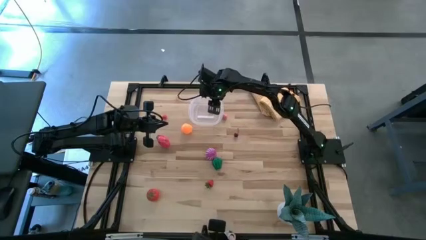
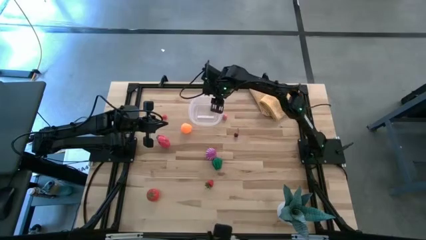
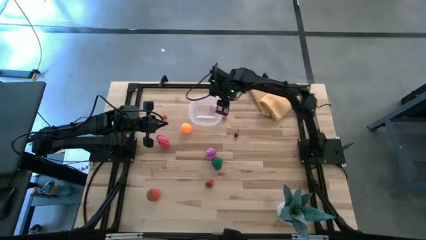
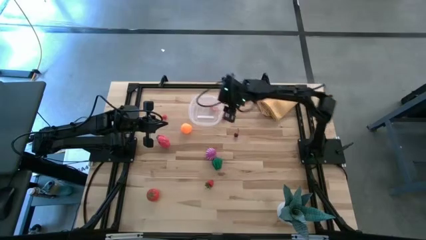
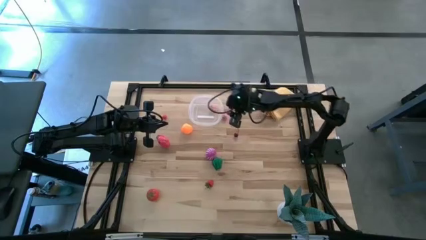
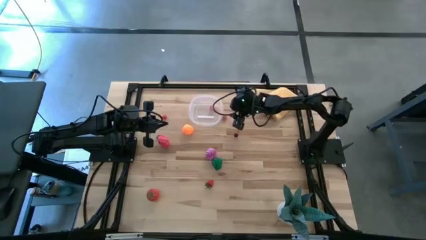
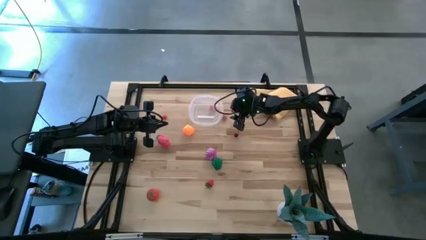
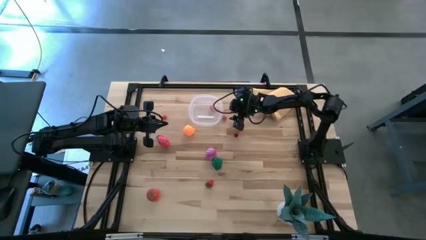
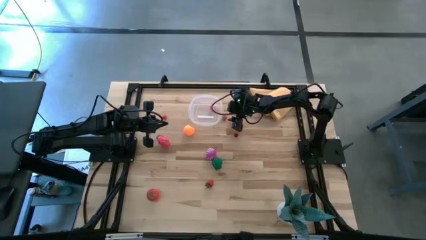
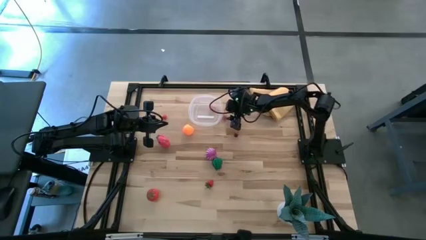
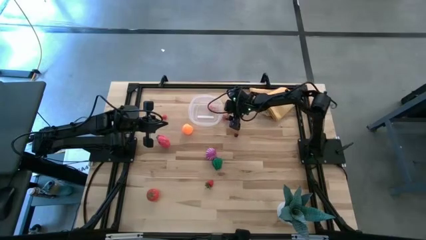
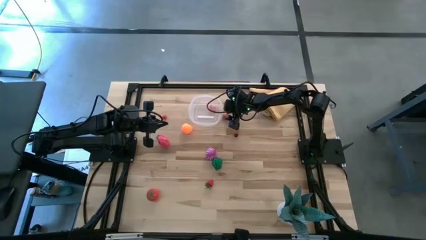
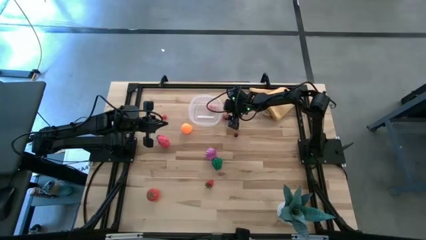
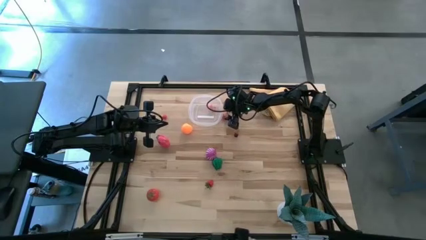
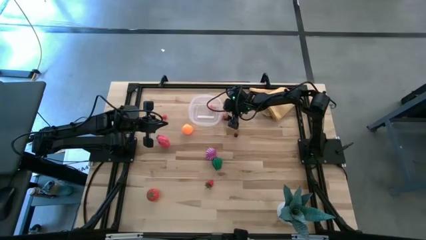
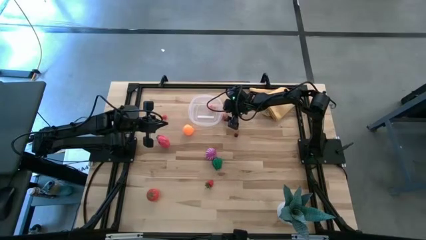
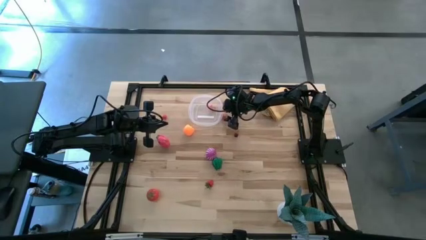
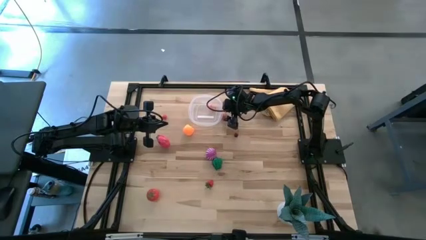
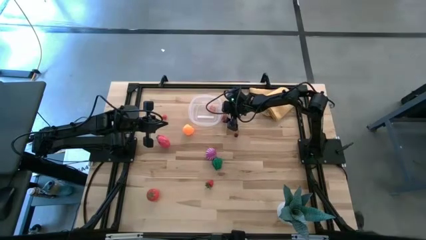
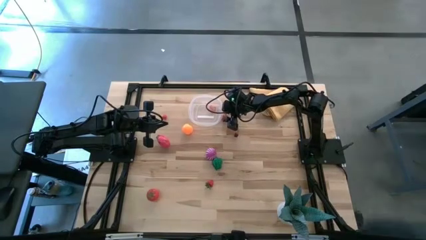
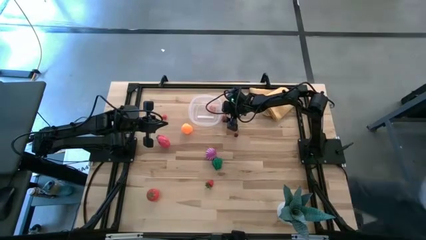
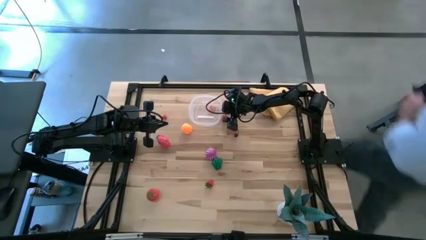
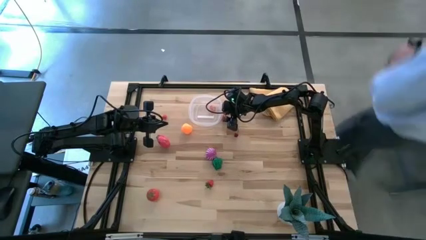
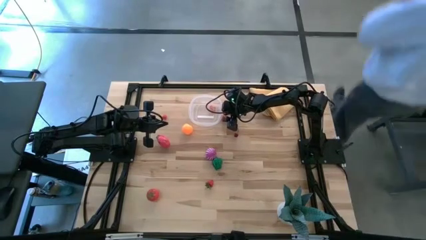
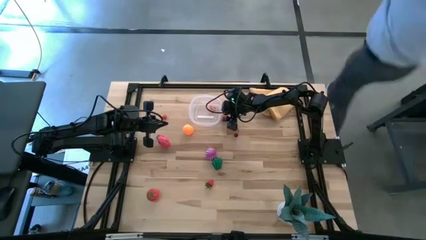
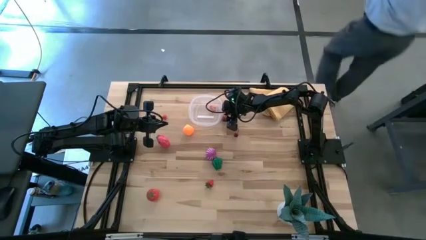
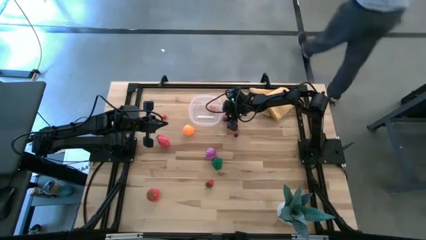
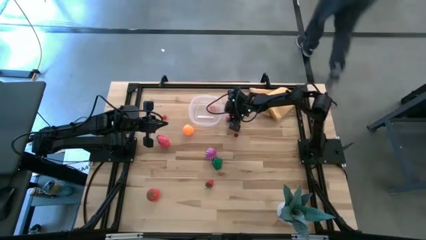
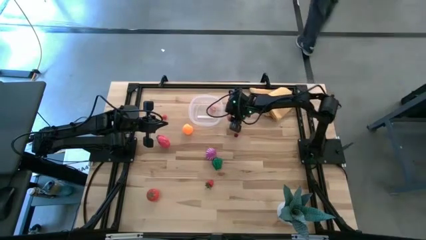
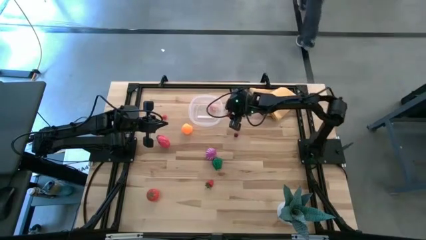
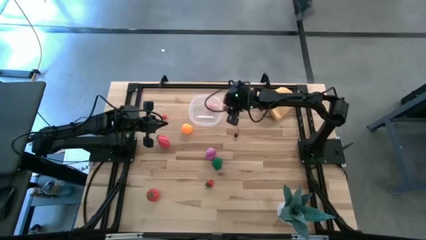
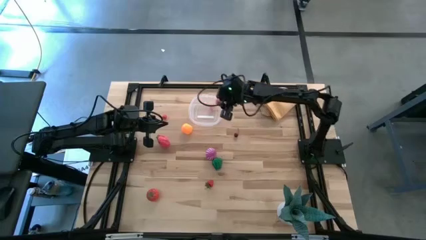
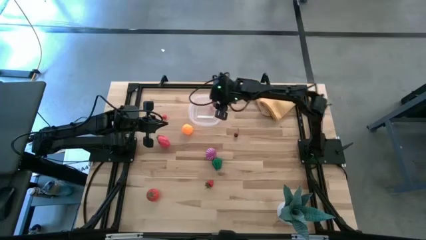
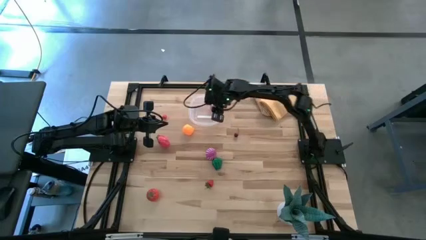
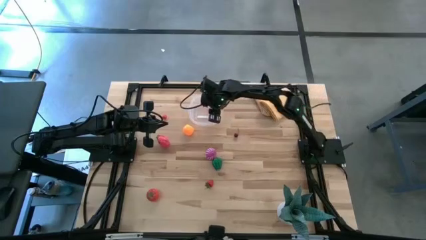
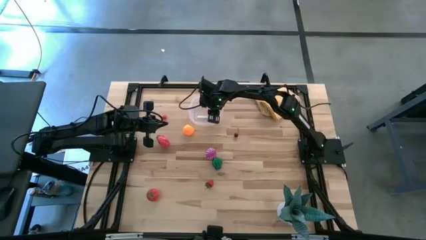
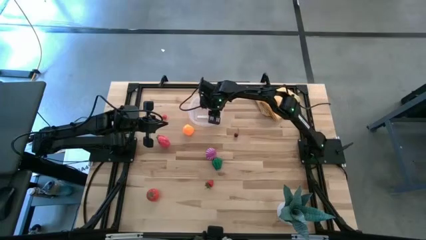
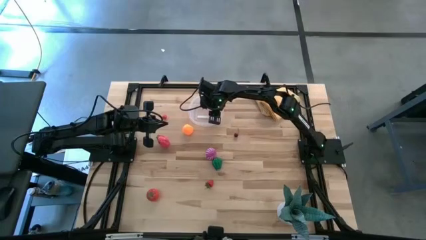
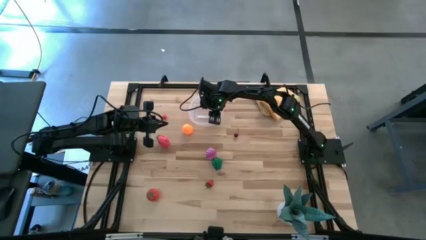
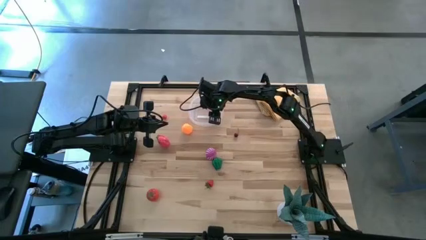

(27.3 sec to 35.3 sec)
Task: Pick and placing Produce into tupperware
Put the pink peach into the transparent bin

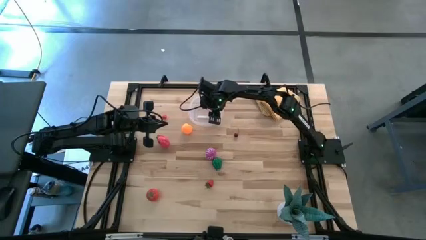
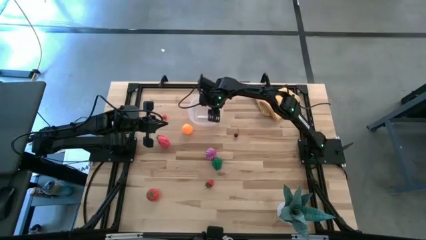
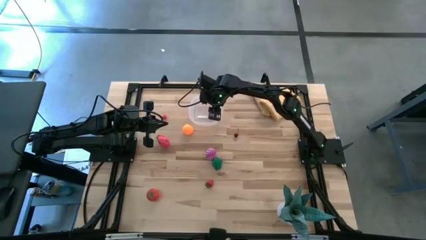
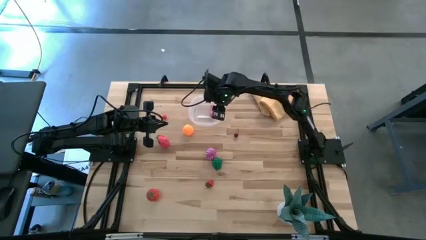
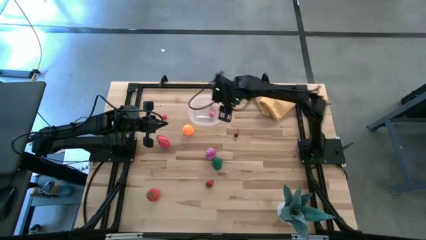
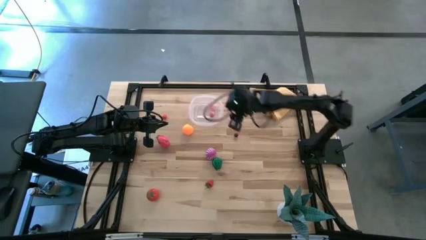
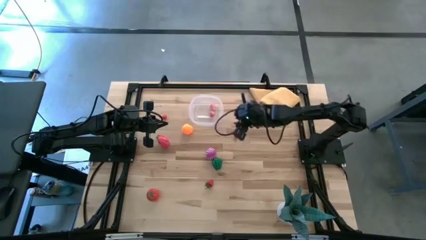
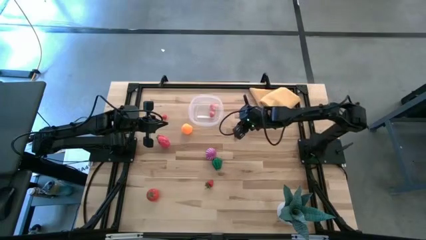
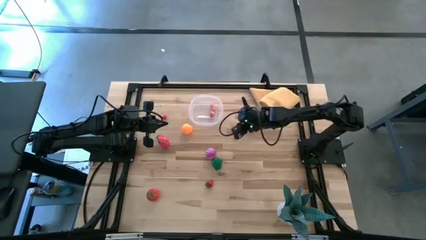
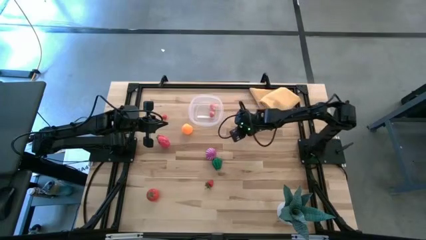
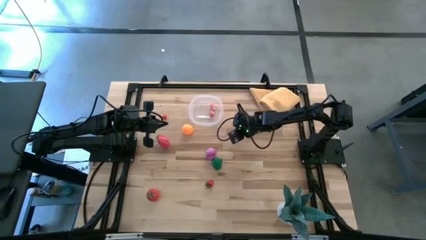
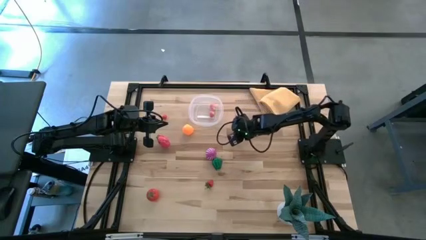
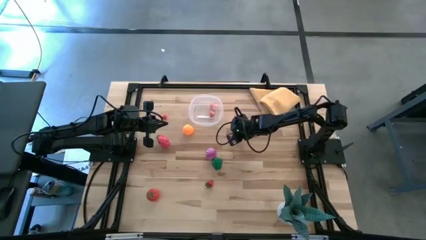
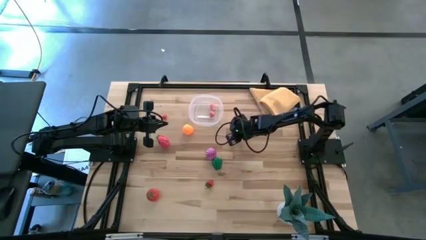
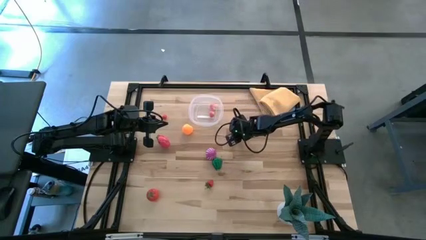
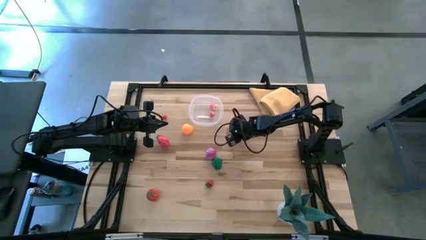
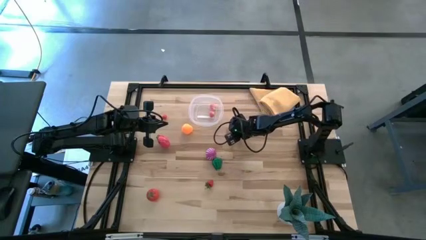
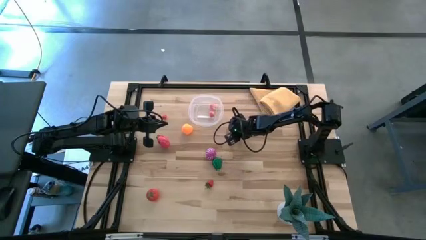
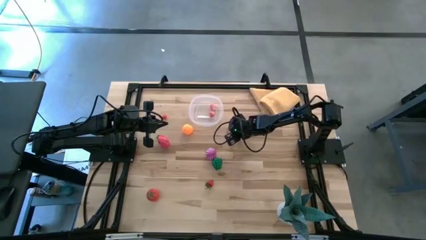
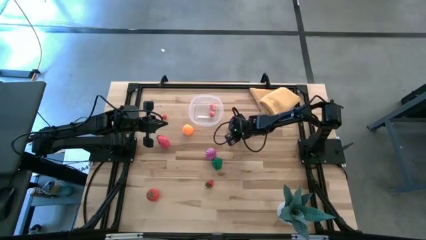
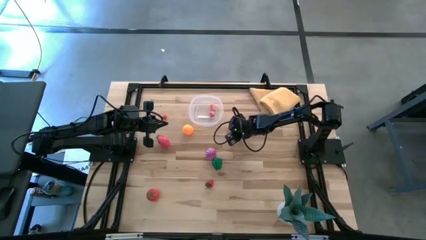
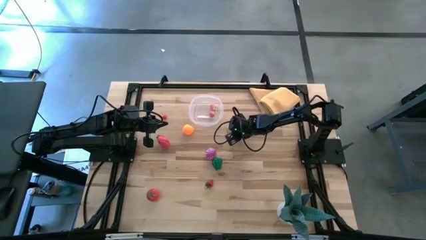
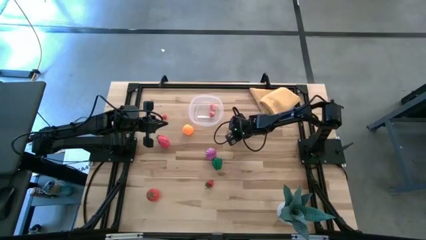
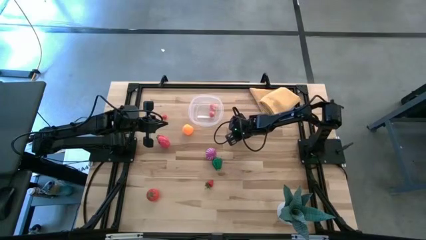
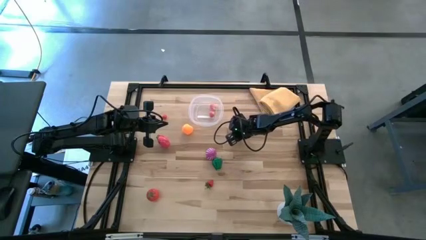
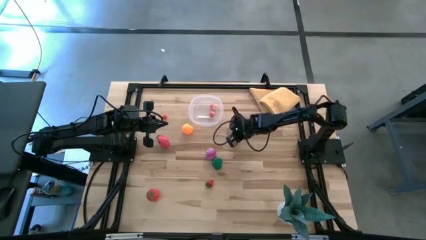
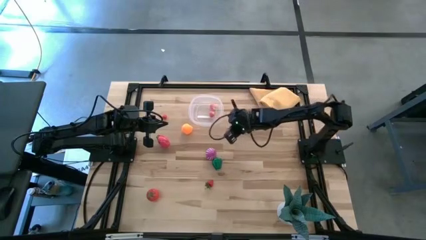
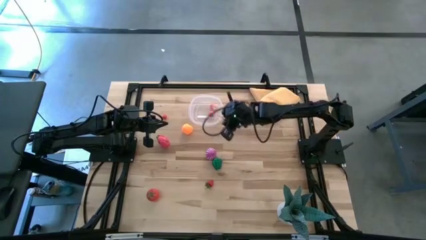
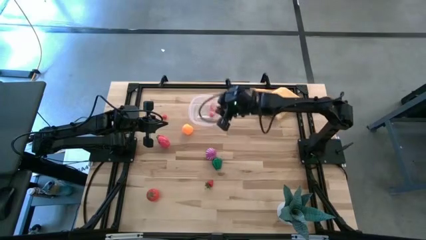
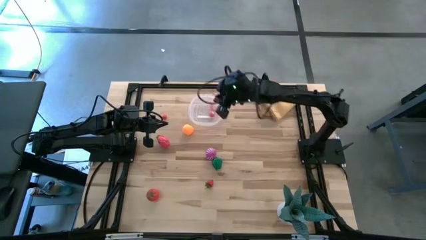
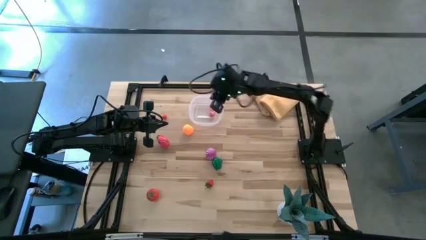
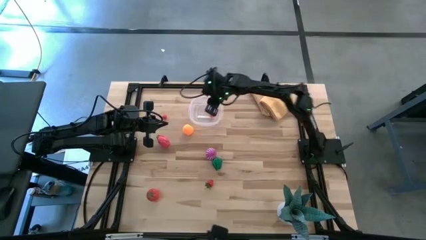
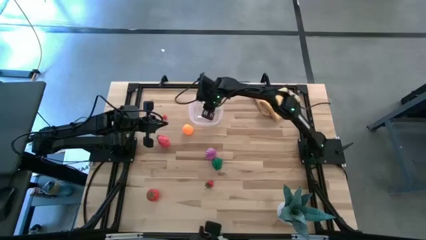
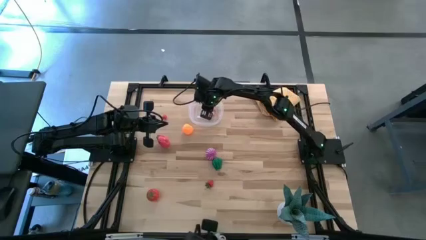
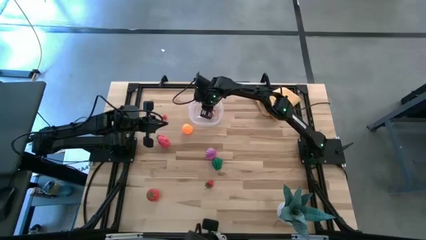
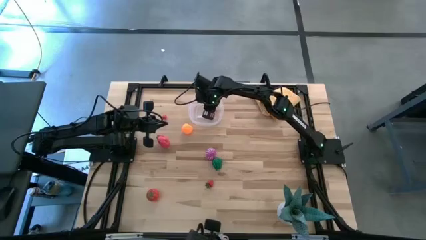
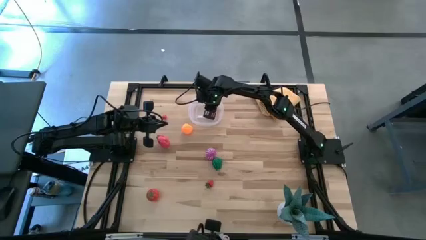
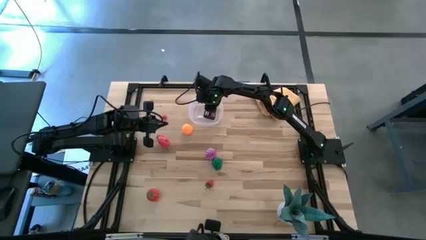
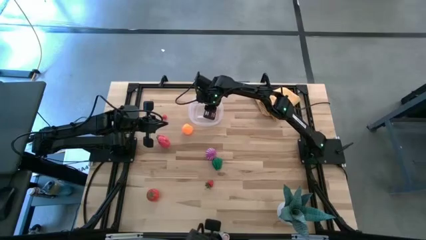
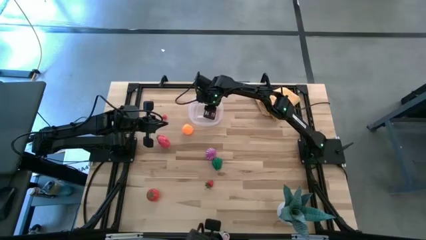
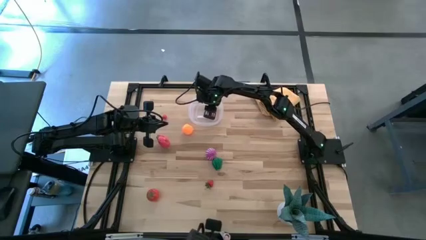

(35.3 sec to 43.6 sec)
Put the dark red cherry into the transparent bin
